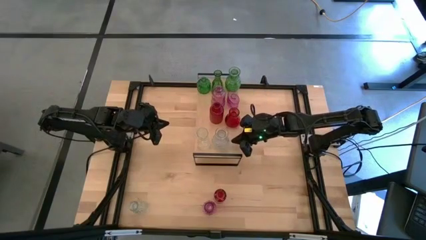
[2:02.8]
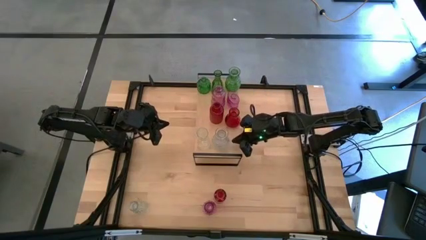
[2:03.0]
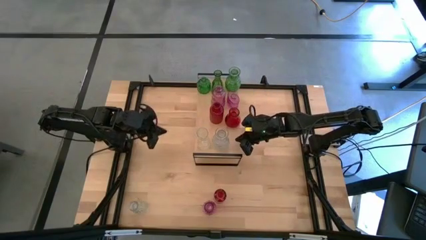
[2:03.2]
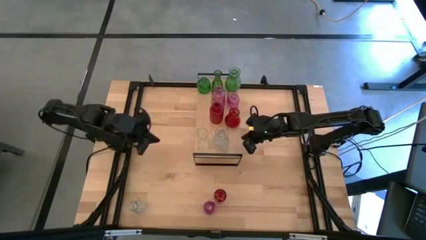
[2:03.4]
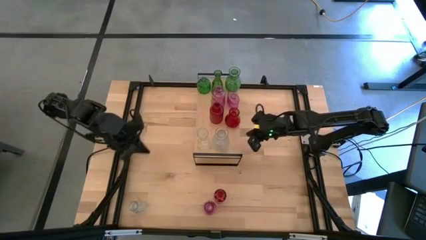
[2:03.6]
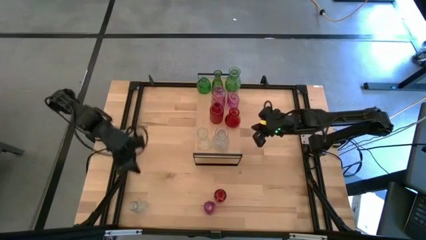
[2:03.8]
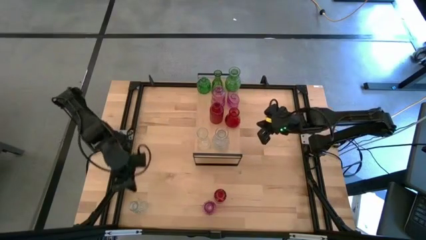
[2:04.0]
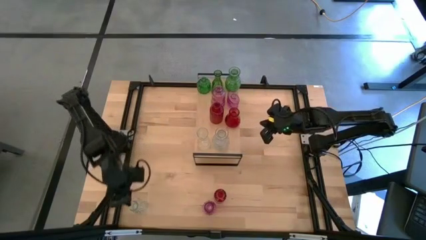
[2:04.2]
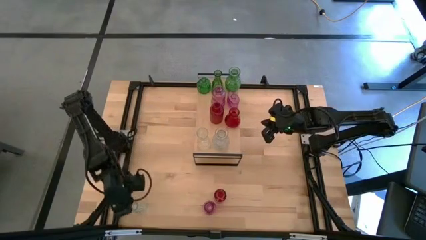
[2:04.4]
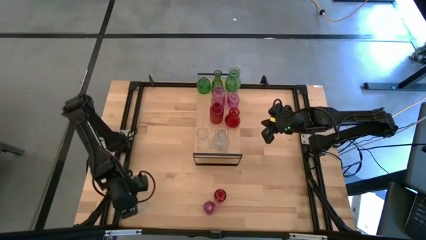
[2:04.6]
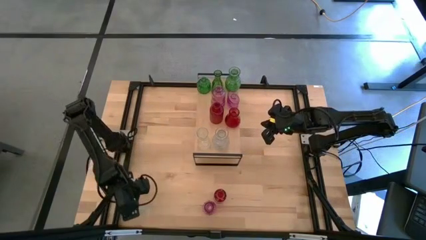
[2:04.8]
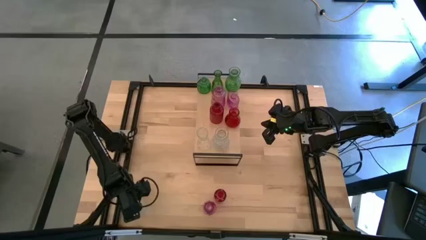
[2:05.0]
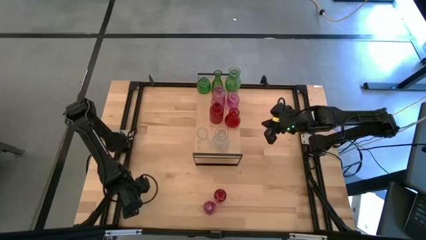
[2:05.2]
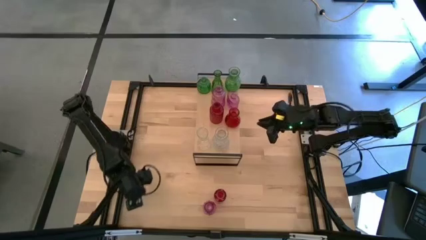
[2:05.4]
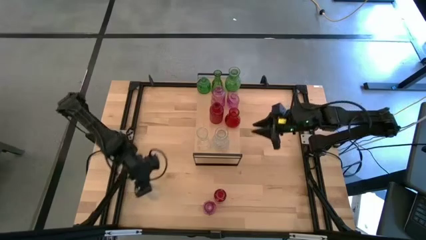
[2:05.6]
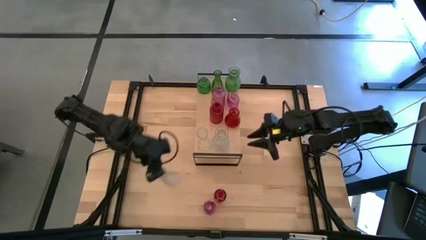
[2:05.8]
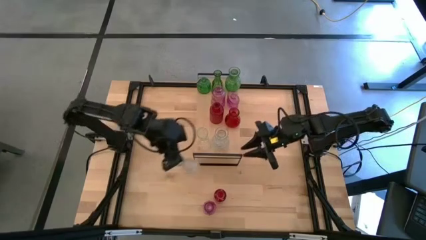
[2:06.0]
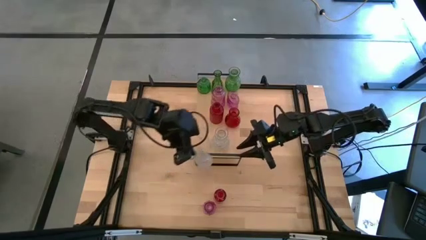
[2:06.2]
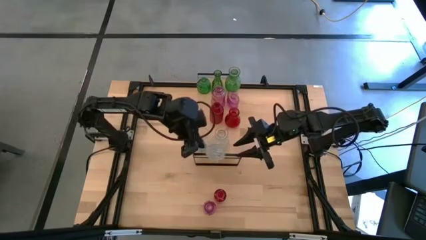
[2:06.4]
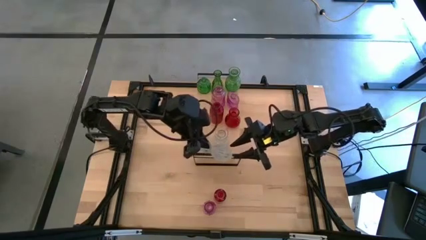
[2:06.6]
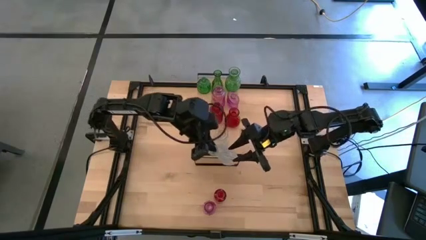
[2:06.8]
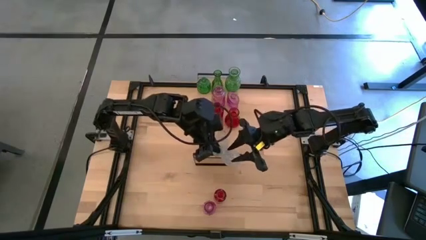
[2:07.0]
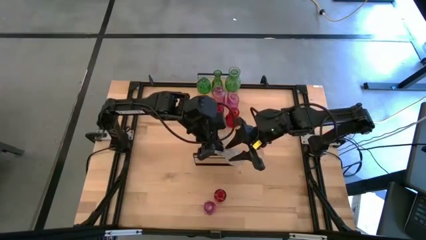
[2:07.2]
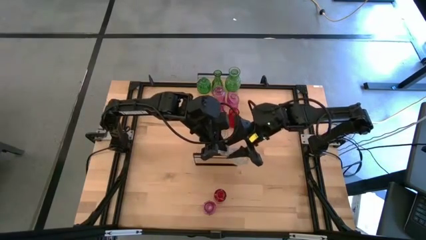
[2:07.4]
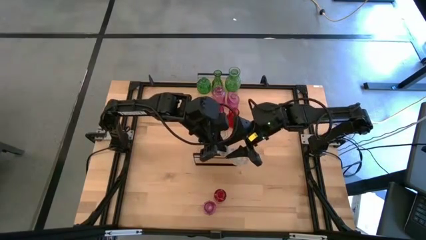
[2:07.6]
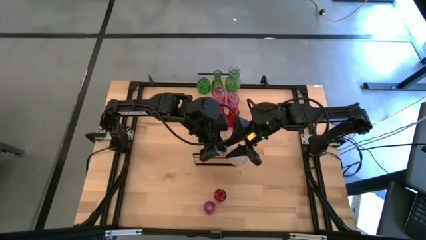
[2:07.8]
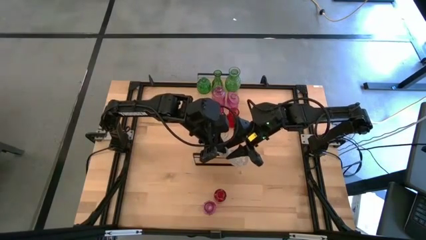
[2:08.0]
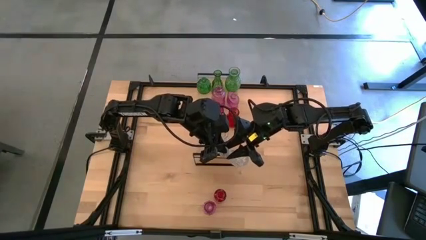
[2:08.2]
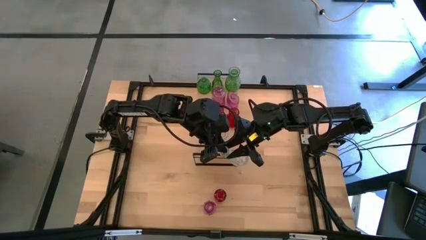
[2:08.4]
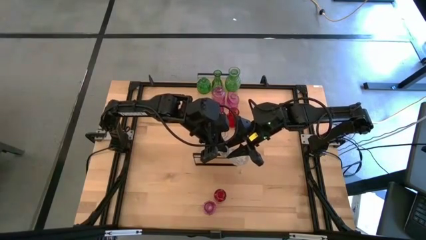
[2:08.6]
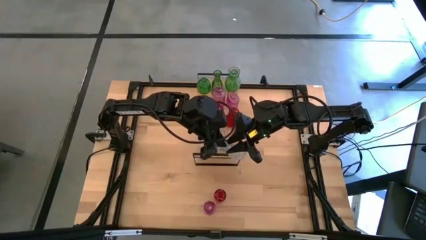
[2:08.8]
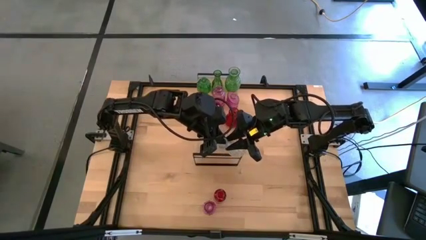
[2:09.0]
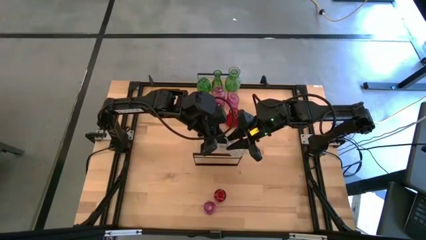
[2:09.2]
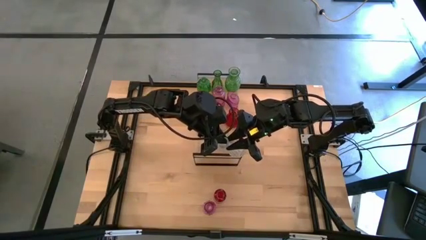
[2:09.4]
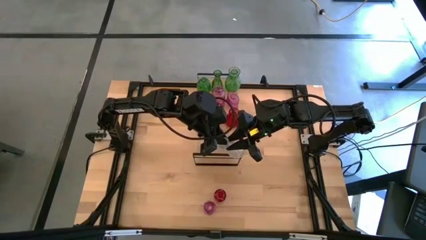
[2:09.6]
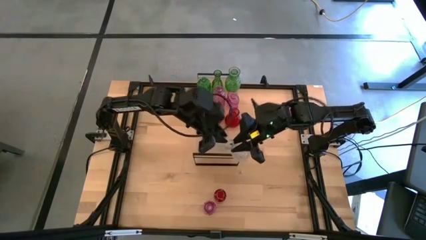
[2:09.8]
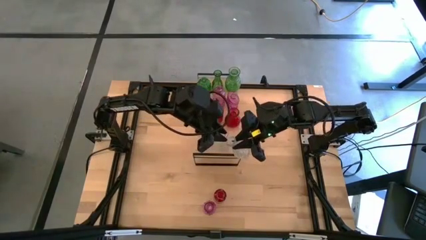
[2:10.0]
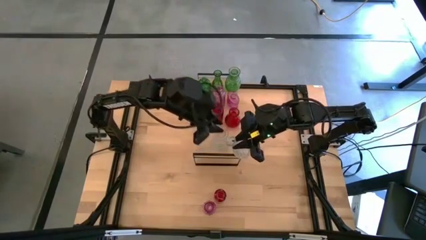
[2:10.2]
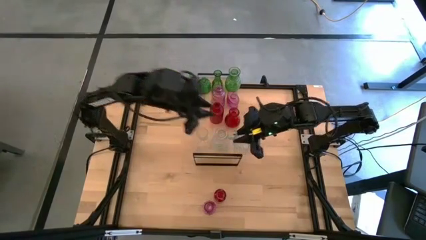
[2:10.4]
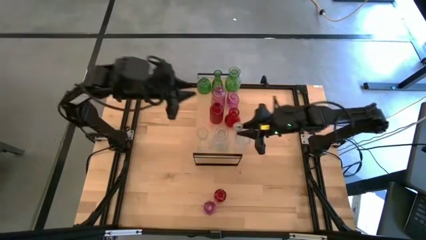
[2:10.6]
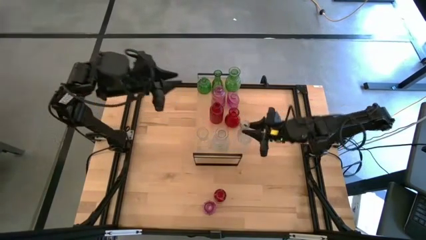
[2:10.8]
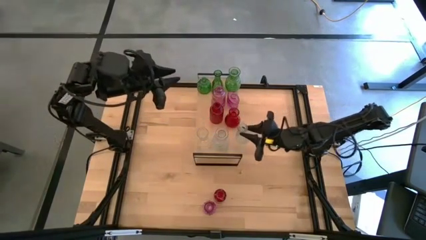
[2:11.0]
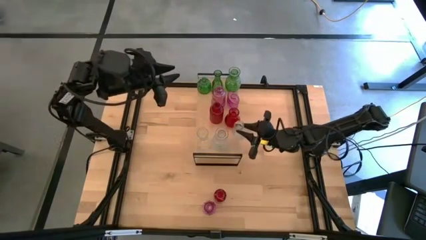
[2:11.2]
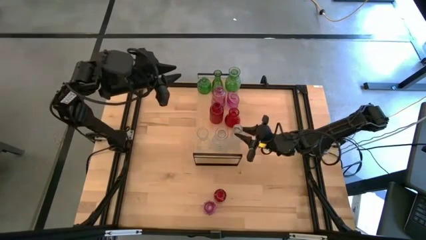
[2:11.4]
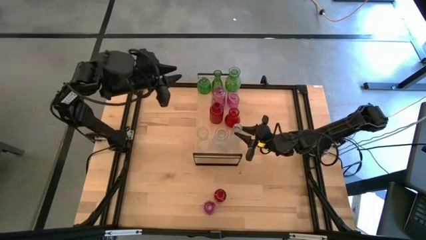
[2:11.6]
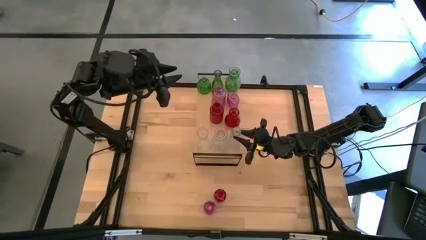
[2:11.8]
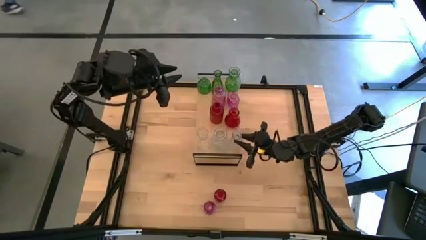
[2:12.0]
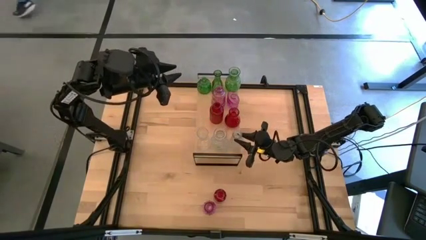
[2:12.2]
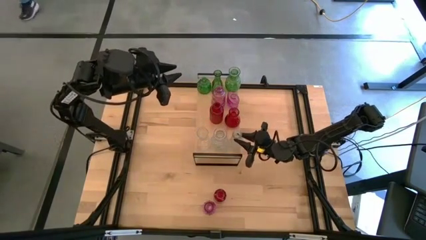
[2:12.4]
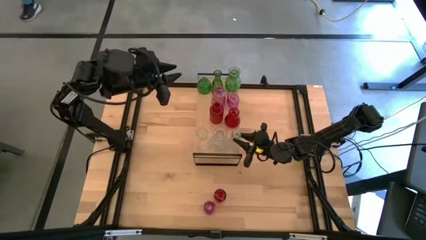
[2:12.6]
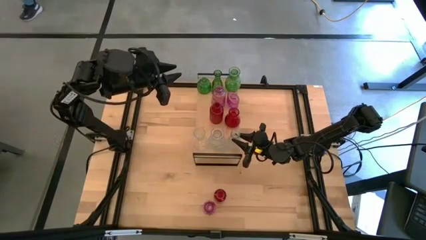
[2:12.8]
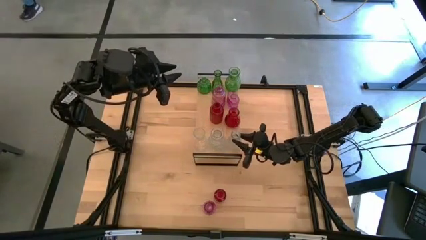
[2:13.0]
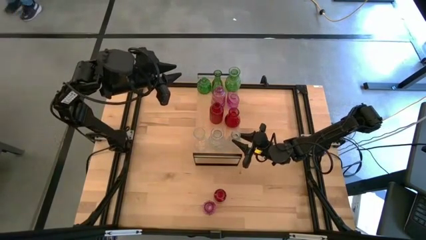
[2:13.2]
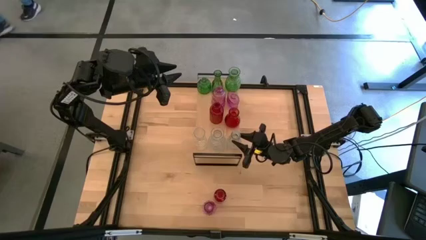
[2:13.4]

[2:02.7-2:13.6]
Task: sort vases onto shelf
Put the transparent vase on the shelf aligned with the other transparent vases

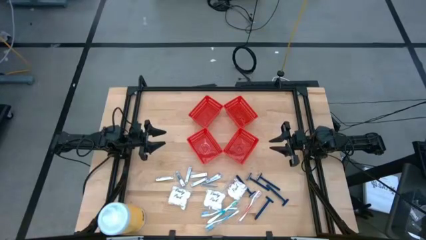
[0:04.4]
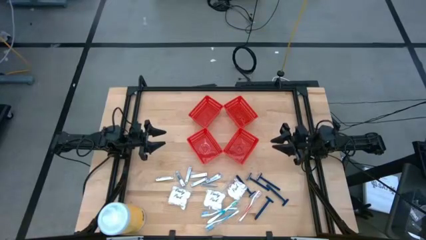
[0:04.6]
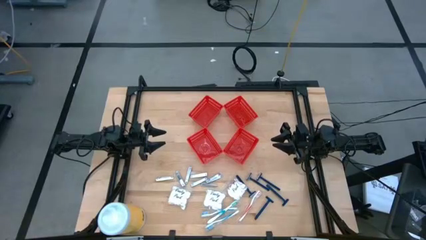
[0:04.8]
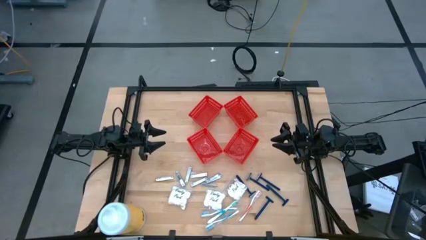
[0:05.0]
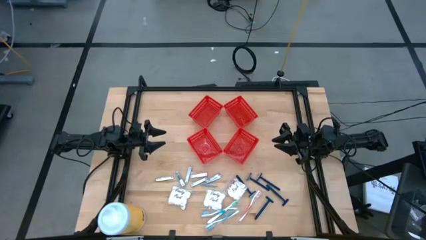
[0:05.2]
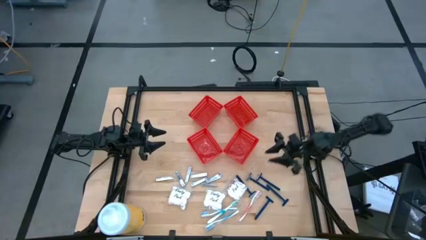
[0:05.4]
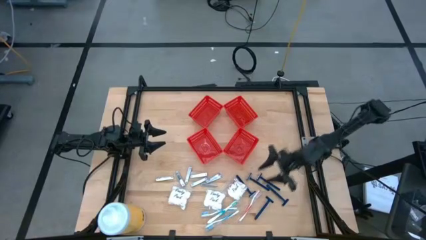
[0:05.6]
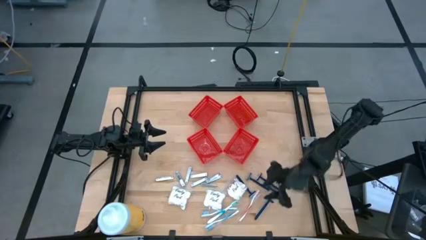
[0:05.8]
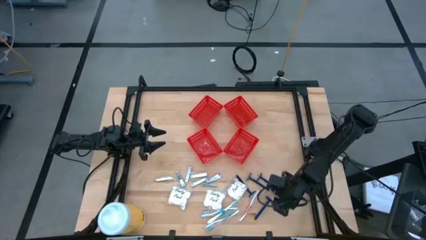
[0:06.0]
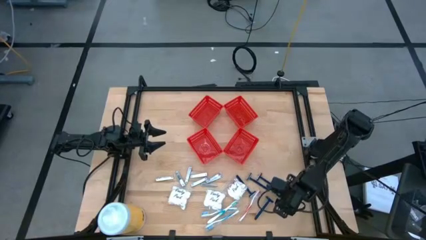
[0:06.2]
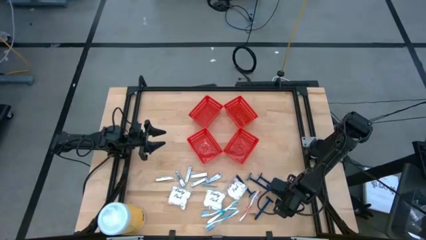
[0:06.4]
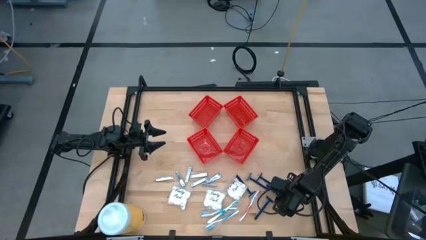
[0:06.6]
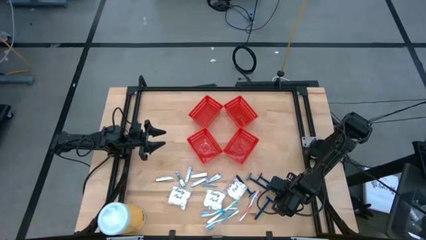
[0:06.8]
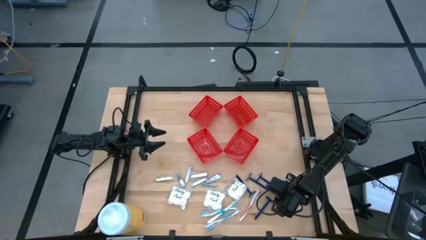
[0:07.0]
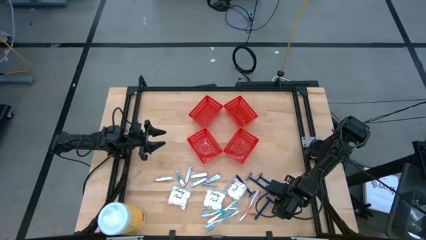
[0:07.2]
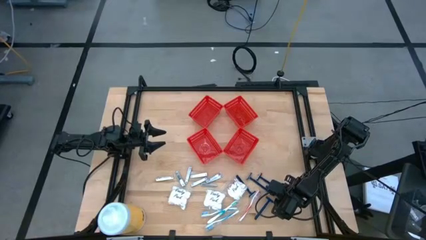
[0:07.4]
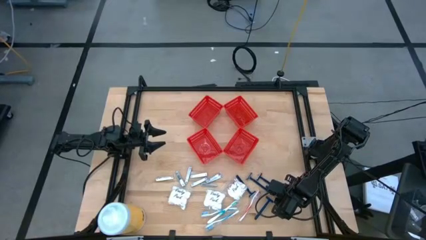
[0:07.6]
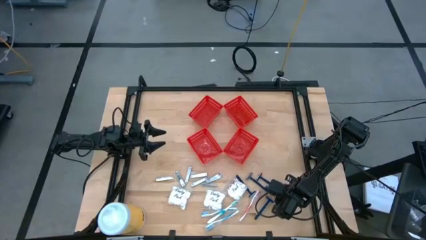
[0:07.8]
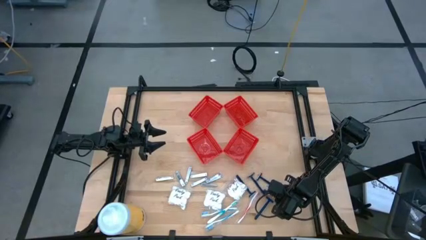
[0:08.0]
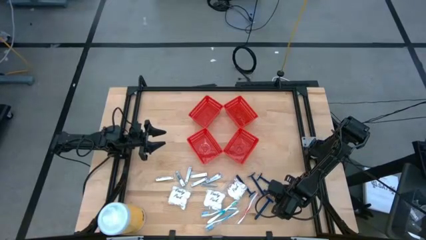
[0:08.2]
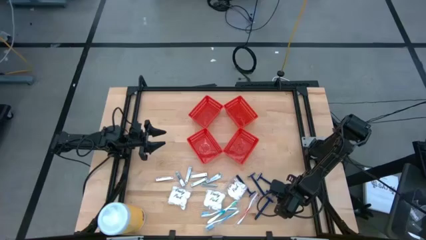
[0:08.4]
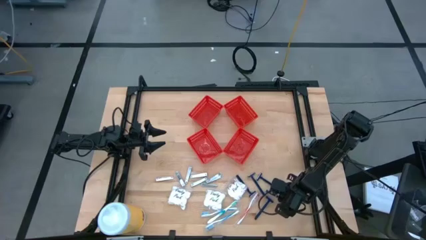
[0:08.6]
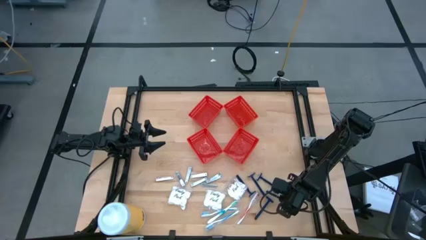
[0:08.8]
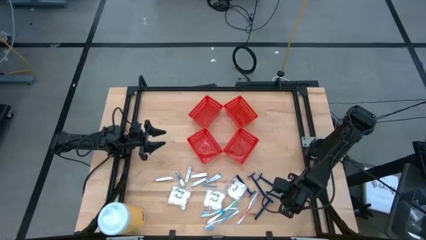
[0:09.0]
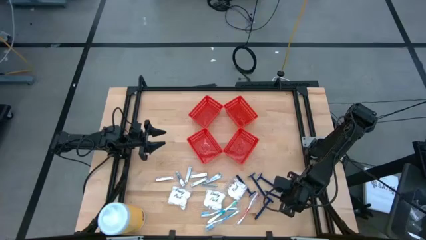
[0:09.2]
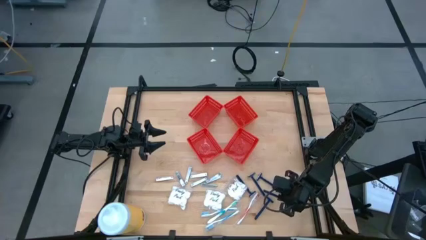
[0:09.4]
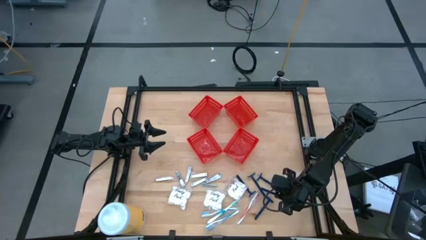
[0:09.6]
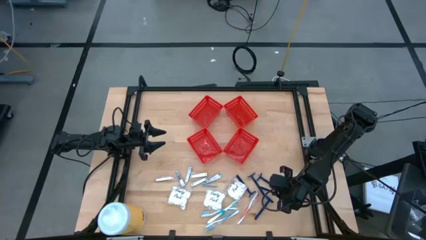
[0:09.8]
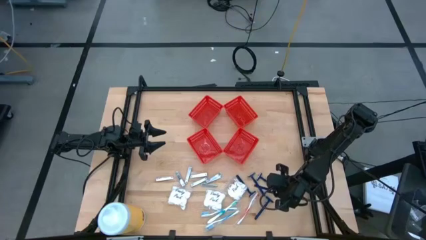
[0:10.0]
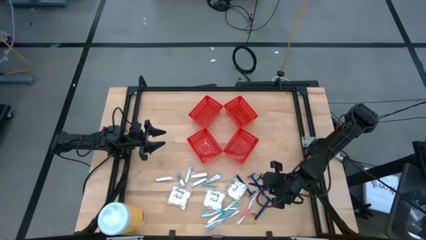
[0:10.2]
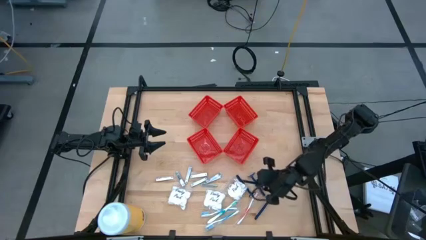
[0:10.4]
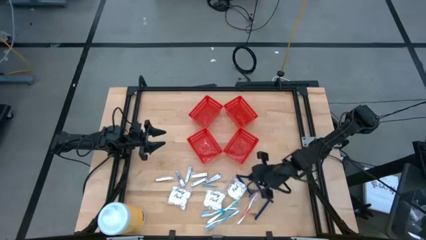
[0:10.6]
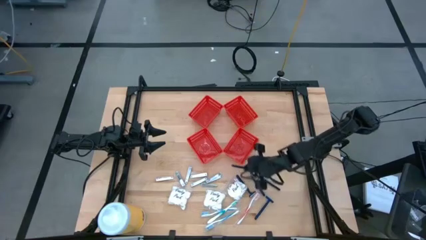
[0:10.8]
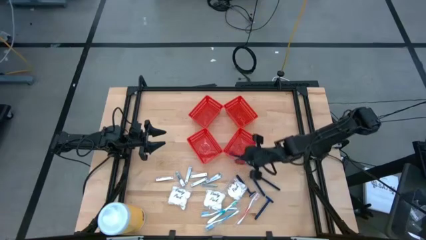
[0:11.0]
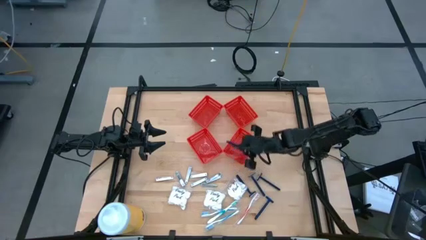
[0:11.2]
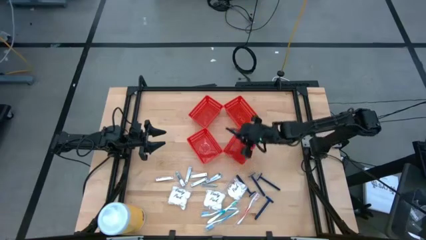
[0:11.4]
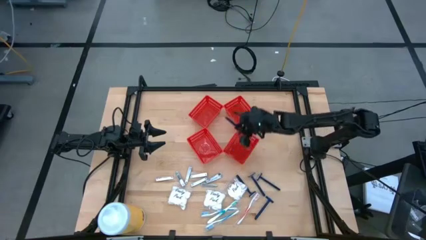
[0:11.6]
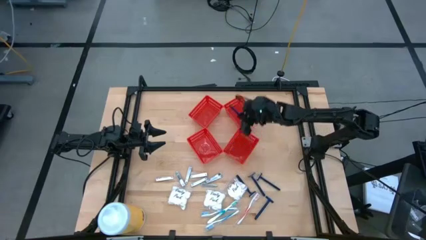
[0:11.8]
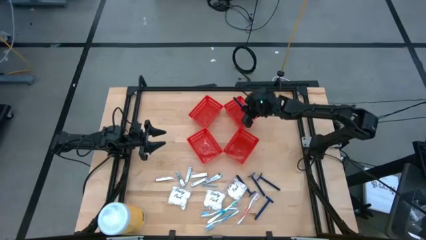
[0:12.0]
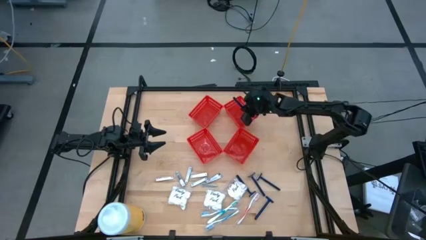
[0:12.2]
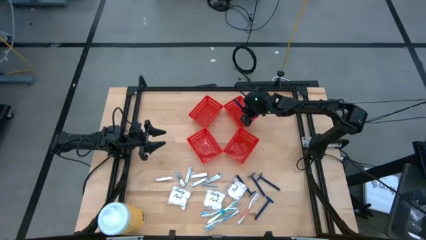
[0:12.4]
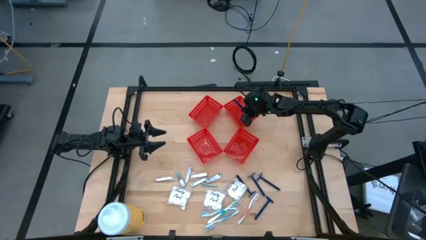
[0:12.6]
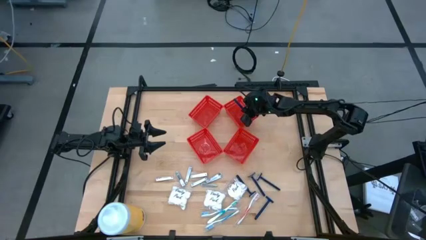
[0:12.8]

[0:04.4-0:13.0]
Task: Pick & Place Travel size toiletries
Put the blue razor into the top right red bin
